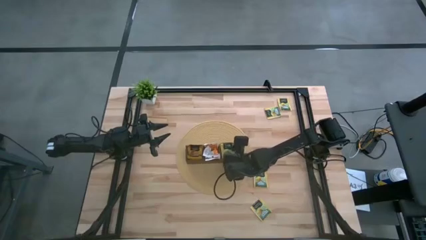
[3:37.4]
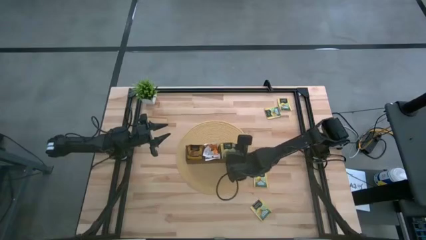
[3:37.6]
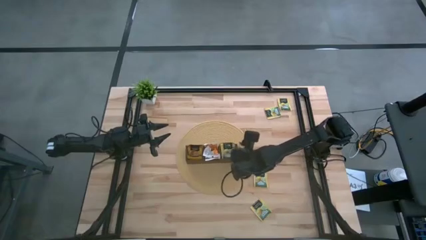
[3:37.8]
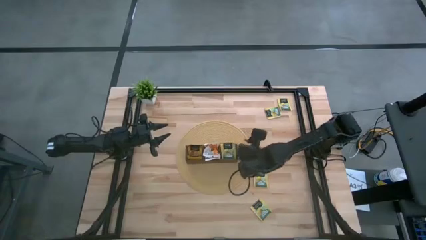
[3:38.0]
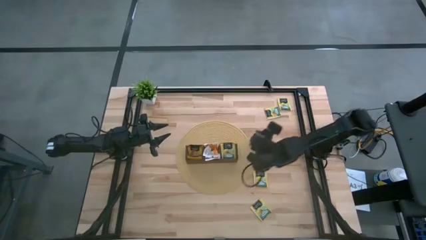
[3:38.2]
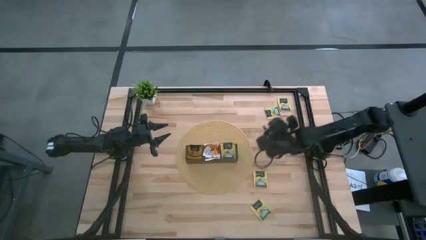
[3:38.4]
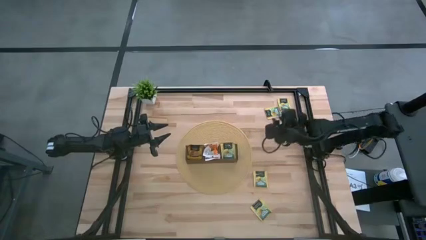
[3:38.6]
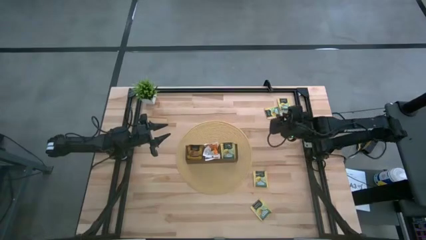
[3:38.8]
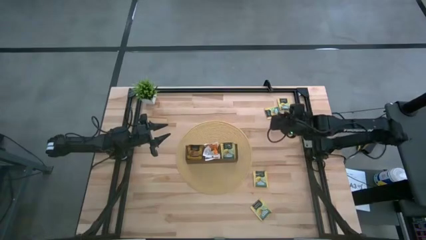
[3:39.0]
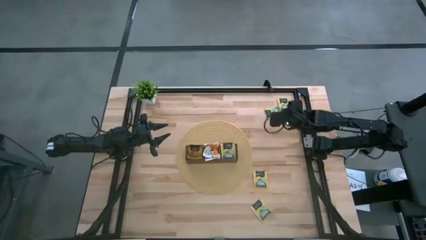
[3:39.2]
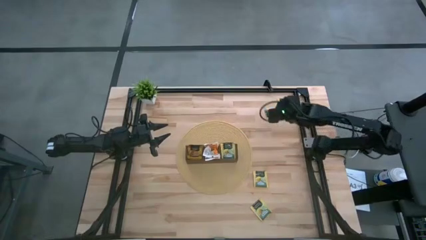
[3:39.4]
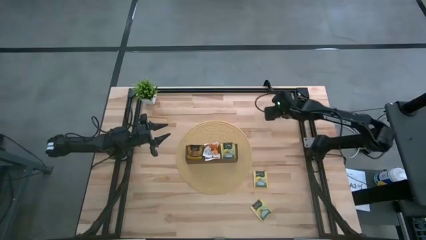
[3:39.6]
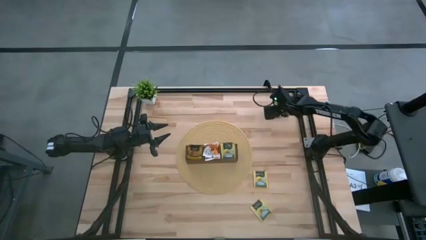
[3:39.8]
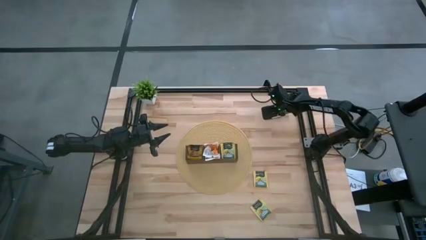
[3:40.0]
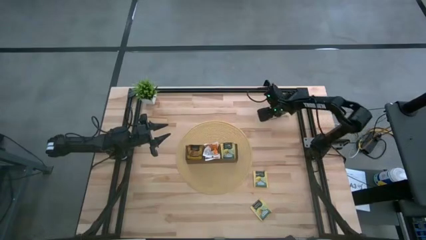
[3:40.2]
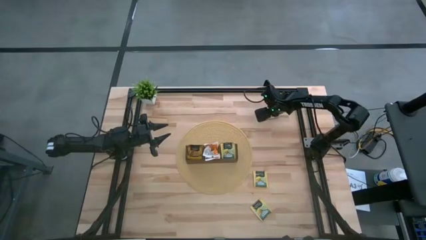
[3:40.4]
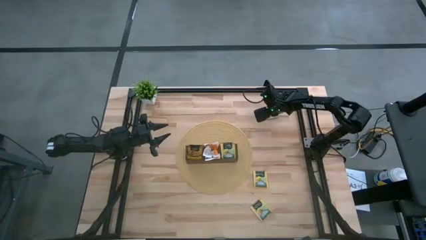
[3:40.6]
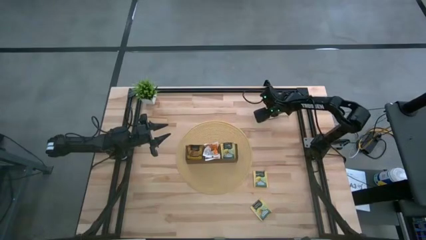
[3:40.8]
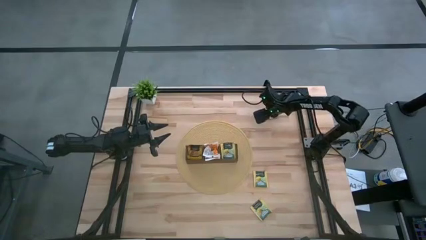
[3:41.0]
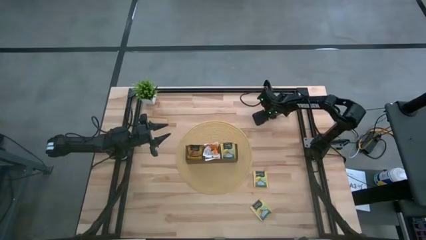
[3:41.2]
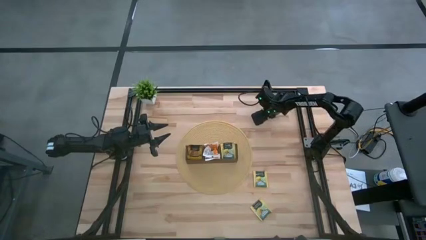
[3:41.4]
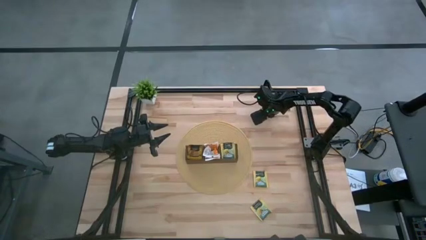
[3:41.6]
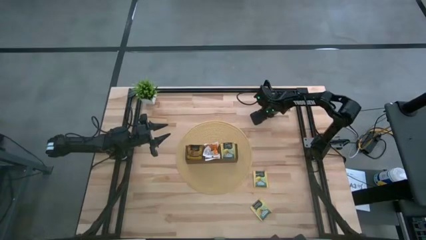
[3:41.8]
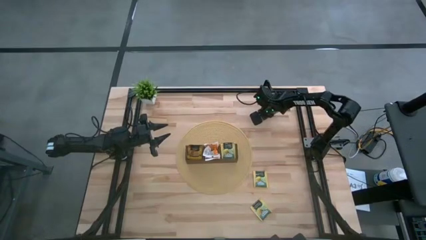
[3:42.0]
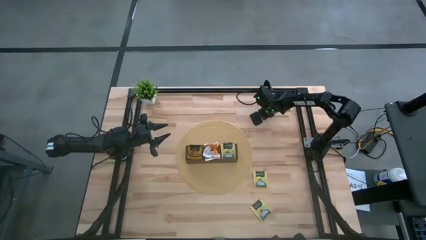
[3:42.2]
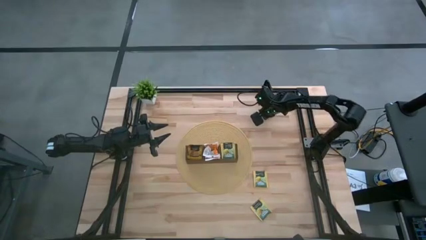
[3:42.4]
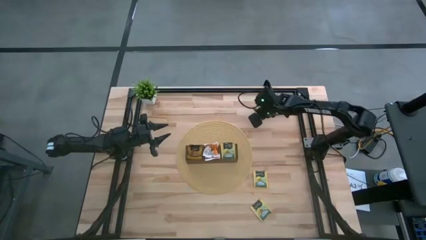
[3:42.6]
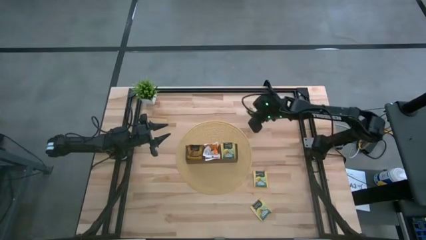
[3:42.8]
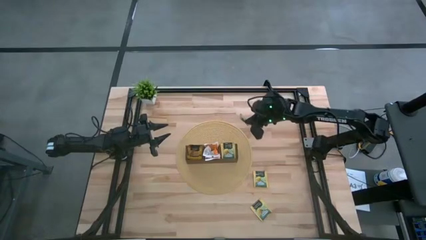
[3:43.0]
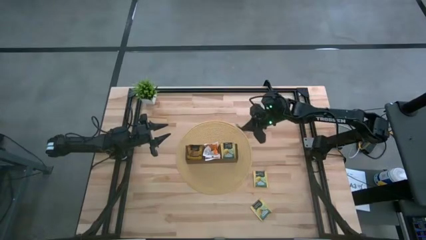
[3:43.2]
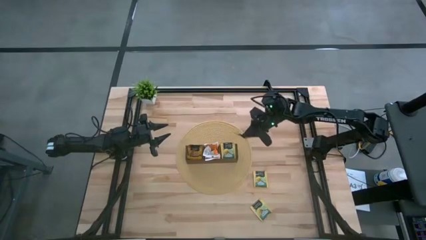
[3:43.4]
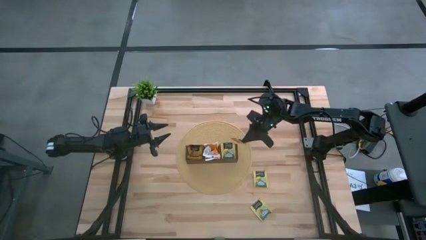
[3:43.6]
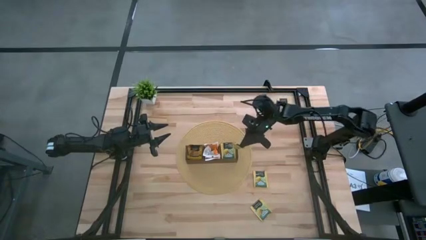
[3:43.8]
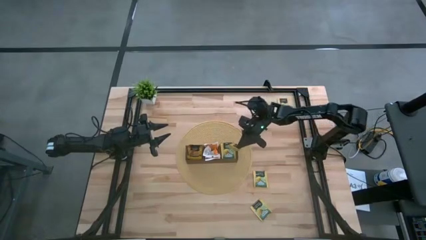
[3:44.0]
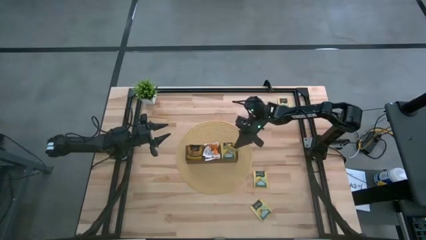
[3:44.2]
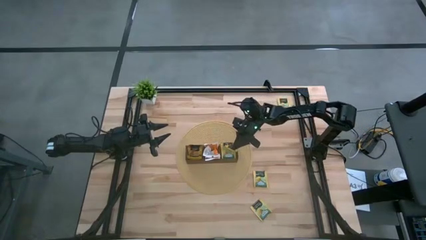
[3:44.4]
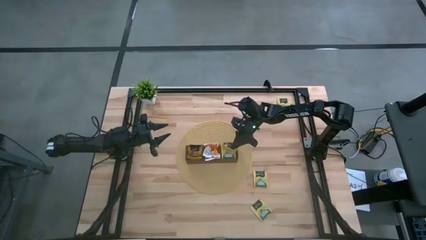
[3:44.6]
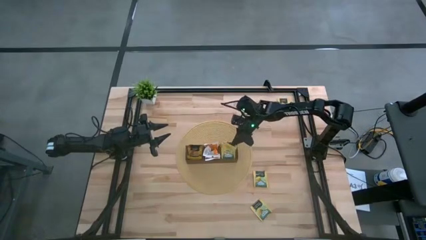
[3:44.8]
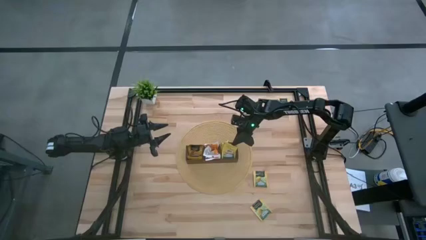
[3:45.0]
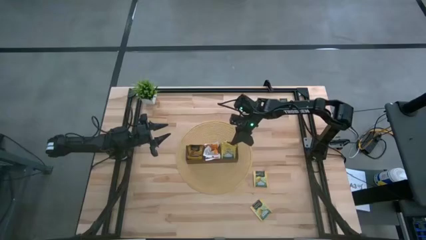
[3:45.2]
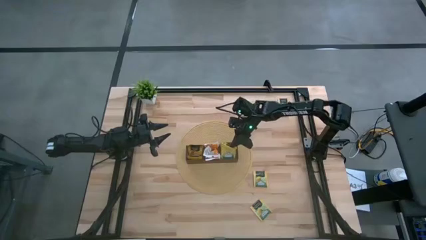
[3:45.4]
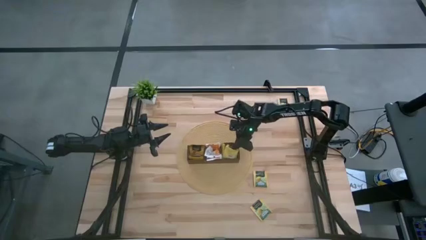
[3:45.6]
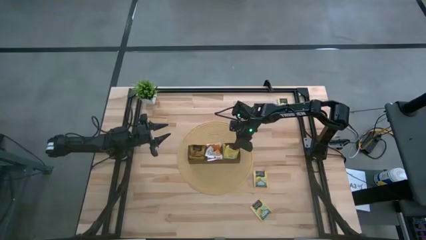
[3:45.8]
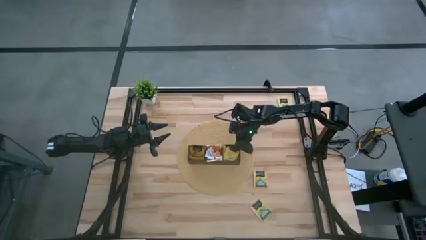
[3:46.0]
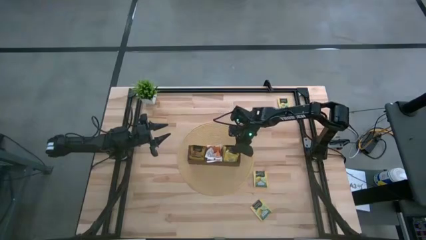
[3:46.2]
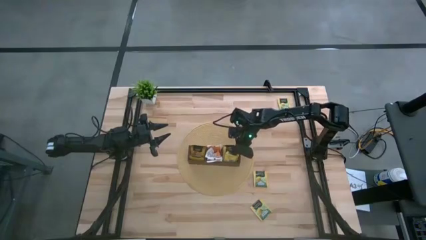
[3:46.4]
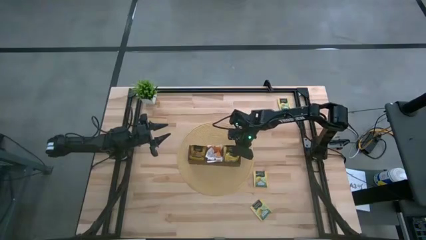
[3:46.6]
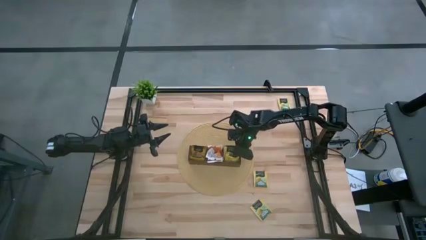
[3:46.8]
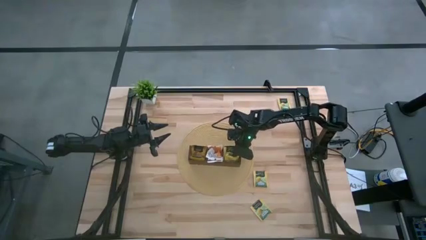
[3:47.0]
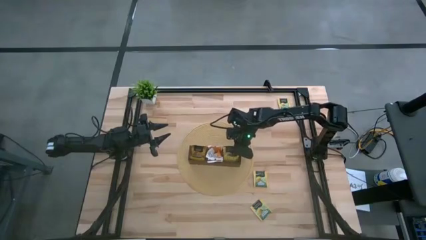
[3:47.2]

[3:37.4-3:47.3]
Task: Pick & Place Tea
Put the lemon tea sachet into the right section of the wooden organizer

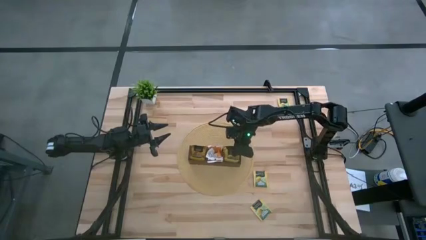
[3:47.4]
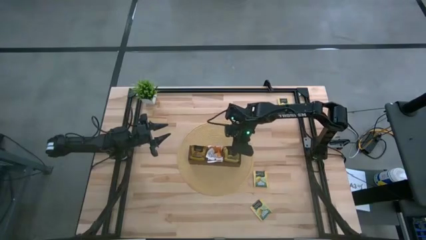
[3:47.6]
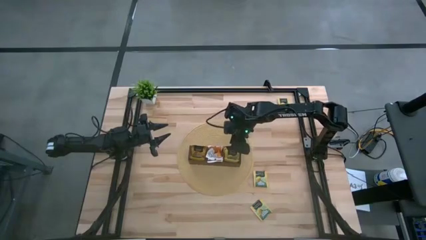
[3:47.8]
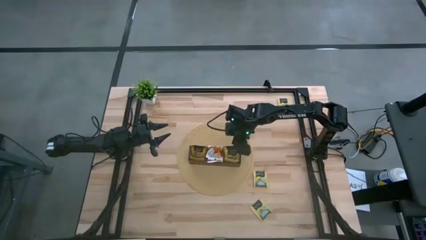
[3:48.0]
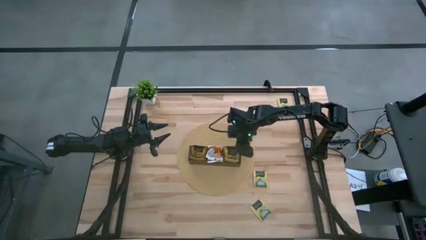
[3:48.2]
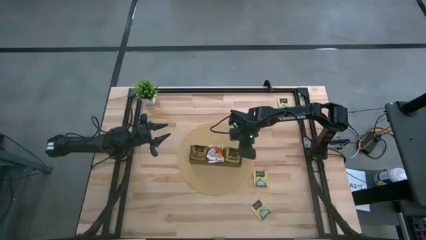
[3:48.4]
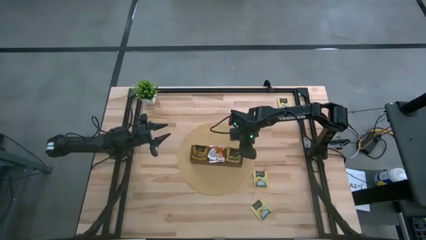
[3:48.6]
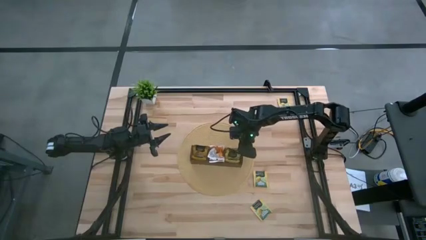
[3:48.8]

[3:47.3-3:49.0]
Adjust the lemon tea sachet in the wooden organizer
